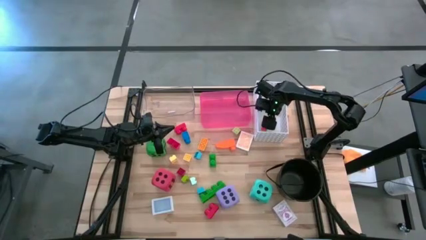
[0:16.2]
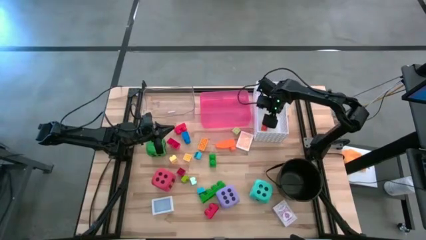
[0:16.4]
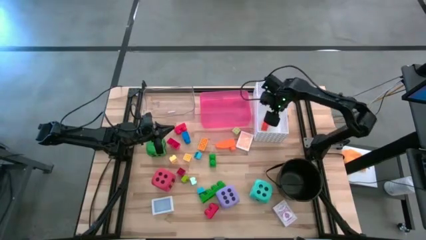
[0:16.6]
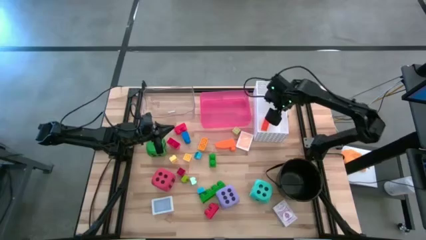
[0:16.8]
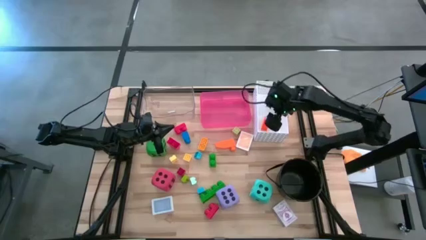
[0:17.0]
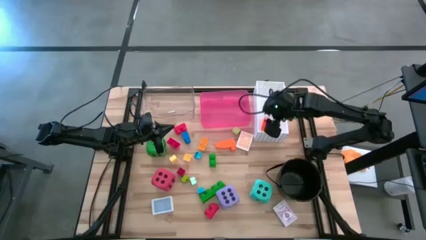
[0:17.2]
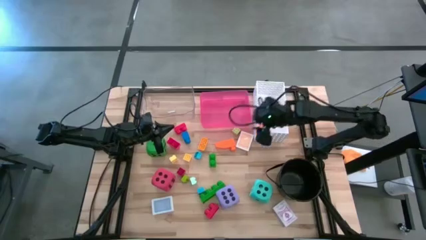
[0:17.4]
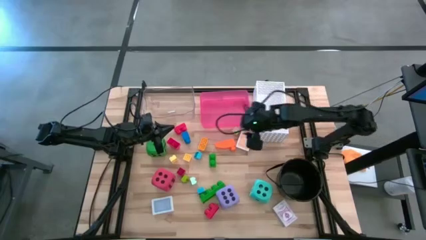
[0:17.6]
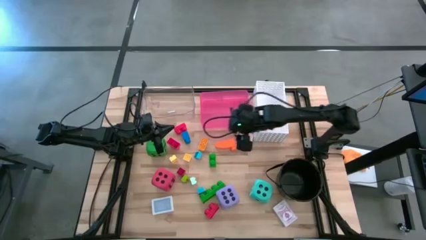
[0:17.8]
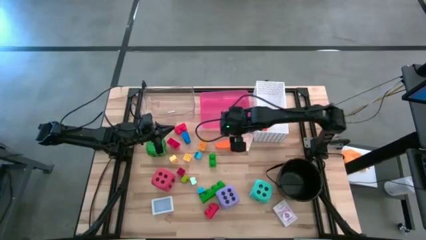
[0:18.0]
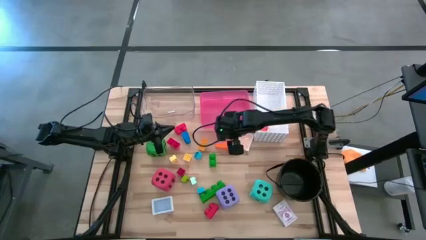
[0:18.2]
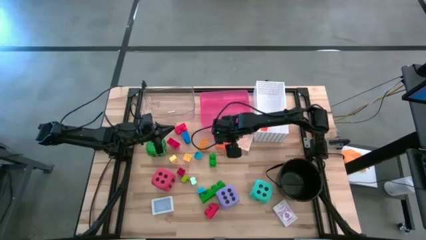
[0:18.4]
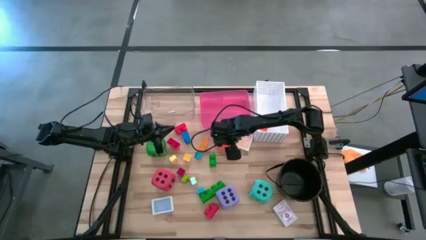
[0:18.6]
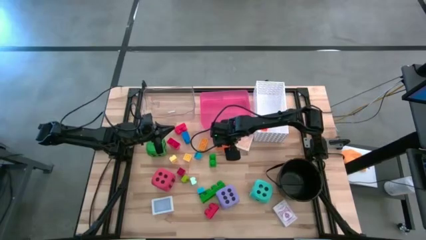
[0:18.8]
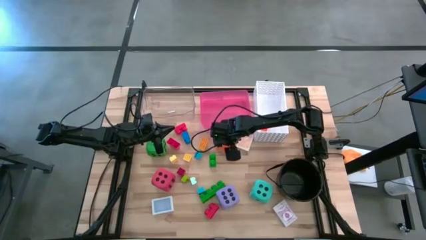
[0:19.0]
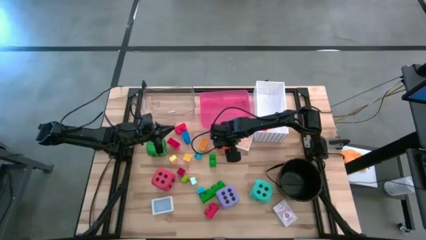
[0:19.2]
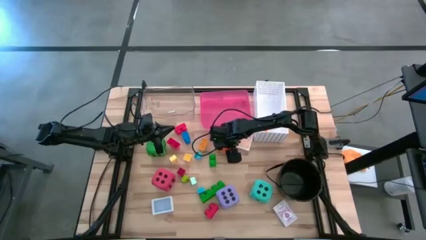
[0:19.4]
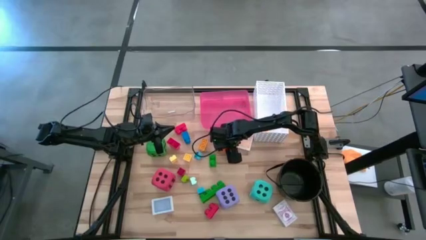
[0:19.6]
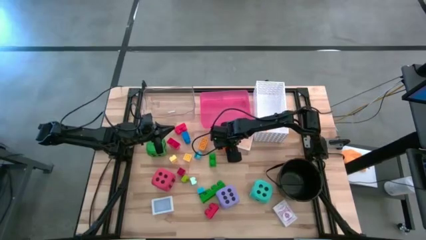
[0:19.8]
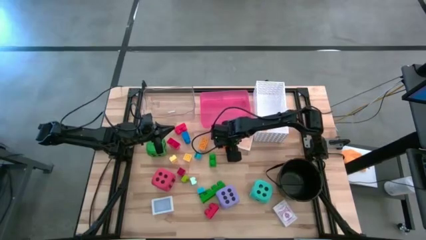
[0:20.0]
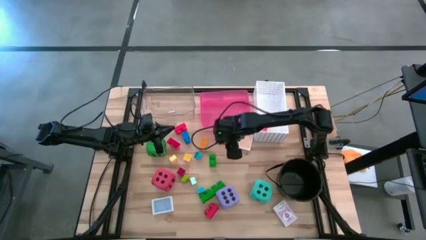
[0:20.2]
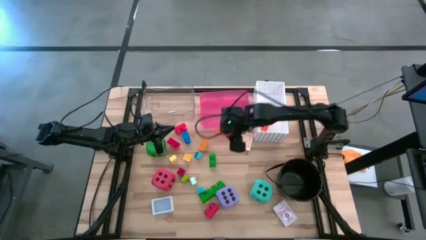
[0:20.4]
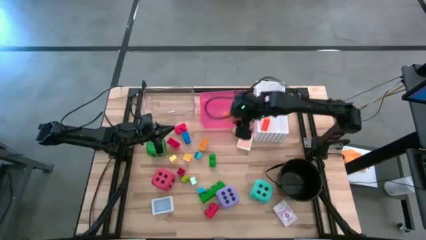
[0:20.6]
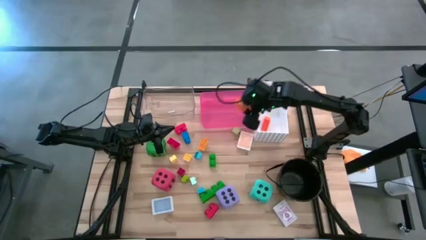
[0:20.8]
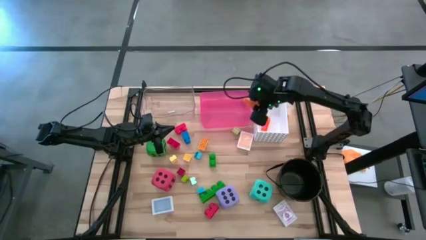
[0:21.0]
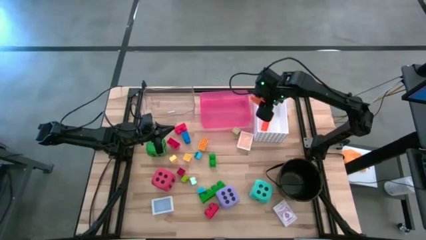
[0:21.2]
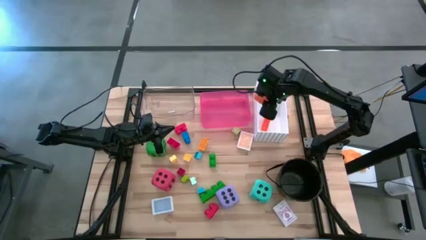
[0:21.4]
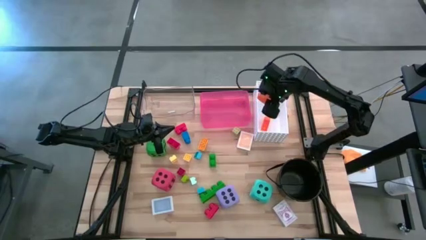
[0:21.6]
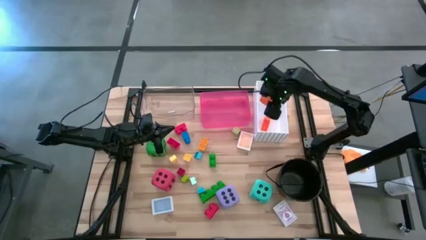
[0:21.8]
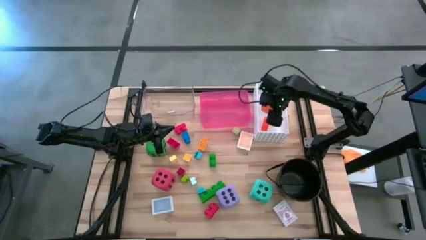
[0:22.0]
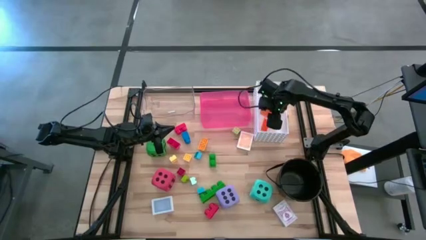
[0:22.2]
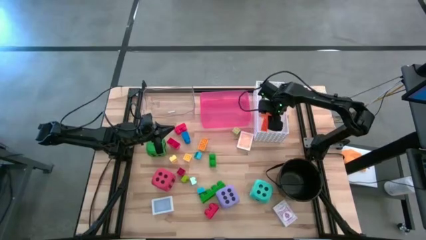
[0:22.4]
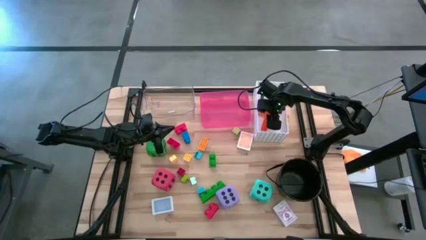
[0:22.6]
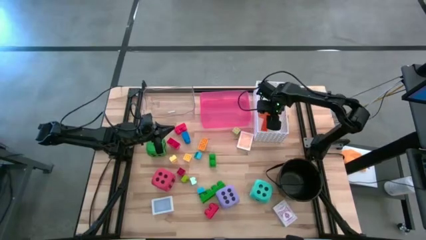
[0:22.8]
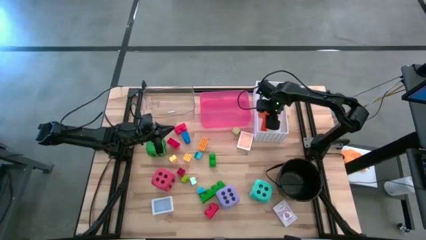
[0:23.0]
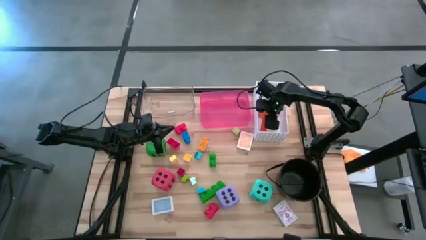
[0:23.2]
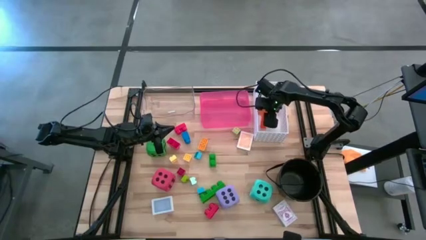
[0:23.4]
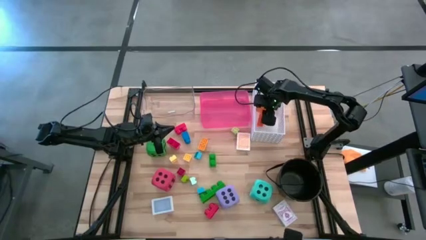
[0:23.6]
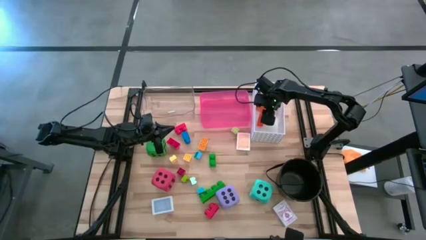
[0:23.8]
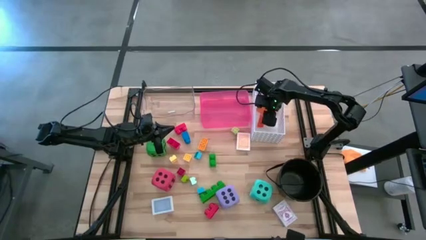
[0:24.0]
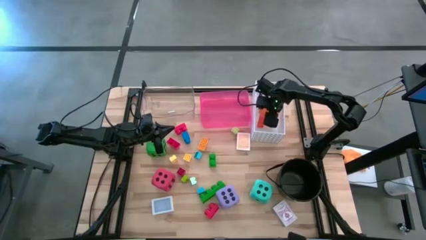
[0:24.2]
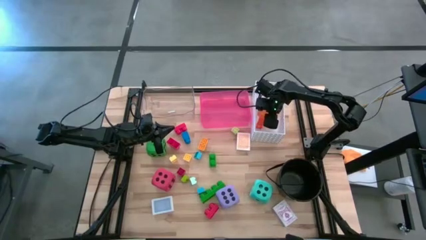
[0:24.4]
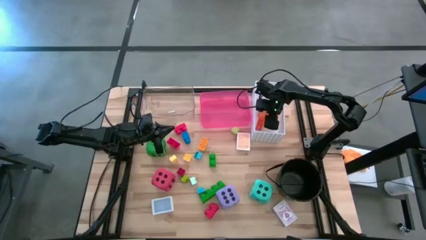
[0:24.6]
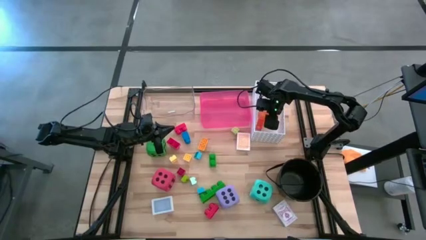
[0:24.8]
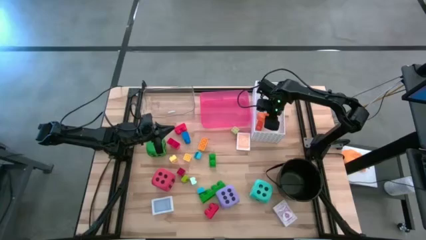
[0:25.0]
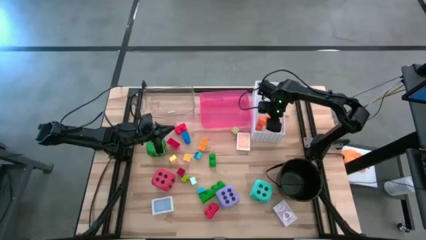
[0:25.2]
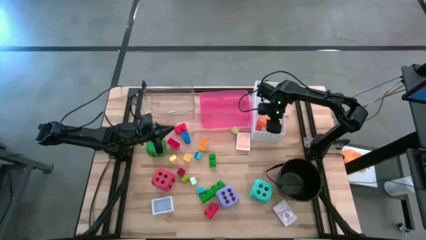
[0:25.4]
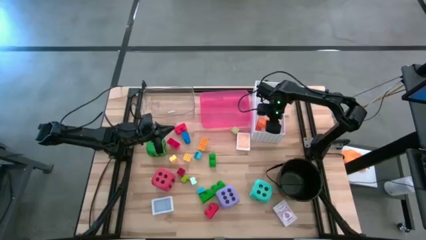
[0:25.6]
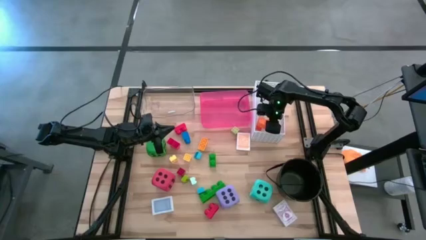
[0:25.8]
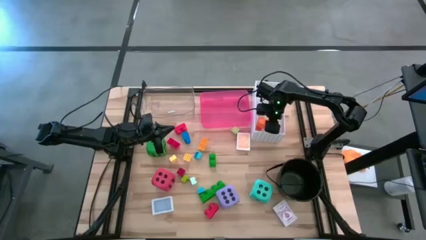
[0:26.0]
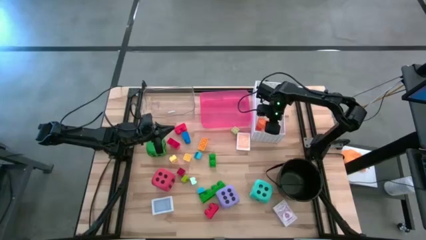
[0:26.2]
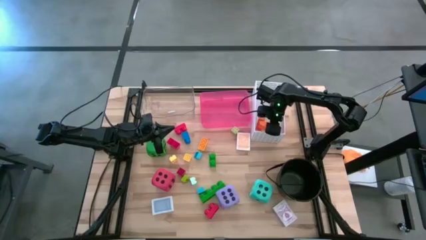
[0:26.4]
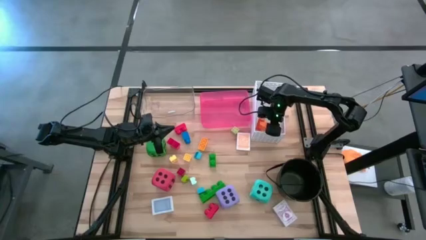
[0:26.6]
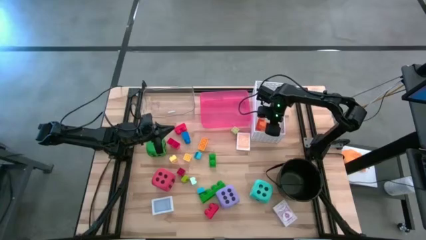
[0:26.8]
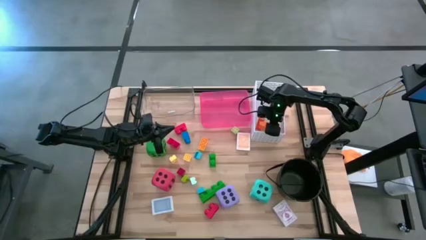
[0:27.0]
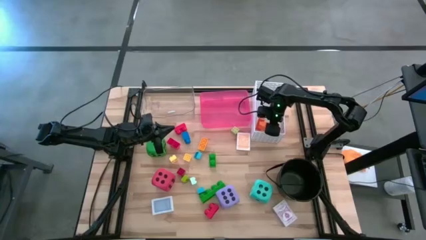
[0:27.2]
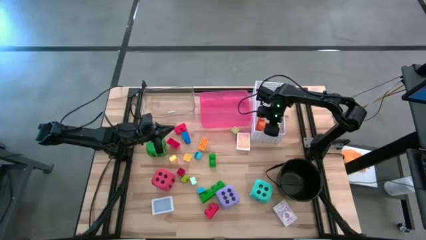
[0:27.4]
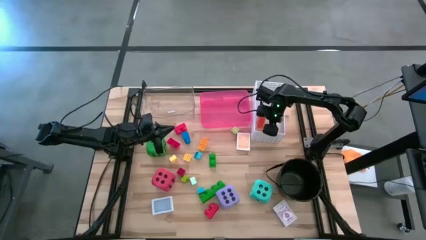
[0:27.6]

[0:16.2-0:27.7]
Task: Pick & Place Toys
Put the large orange game piece into the white bin

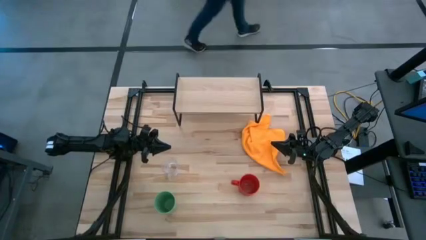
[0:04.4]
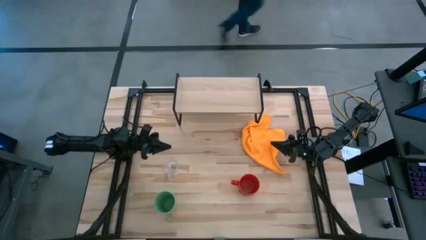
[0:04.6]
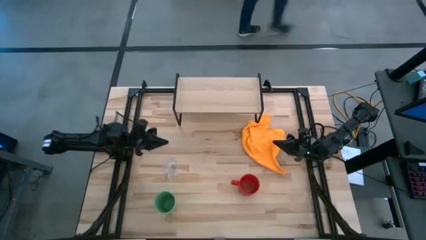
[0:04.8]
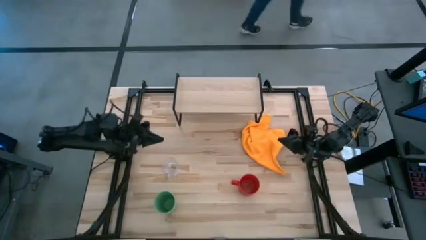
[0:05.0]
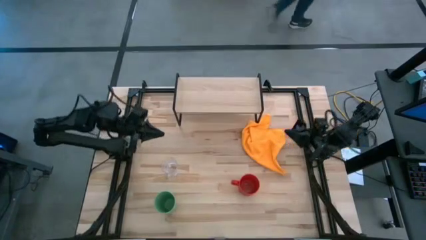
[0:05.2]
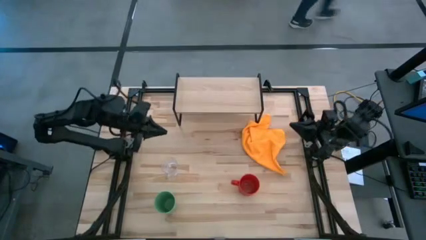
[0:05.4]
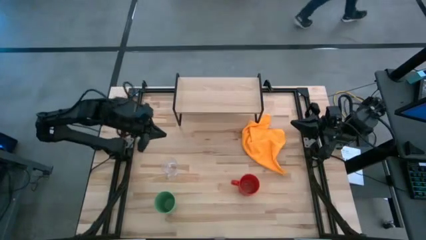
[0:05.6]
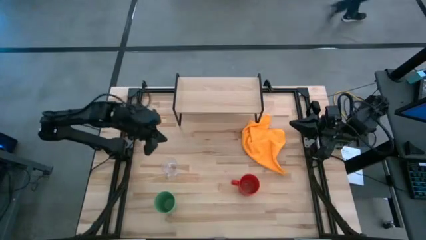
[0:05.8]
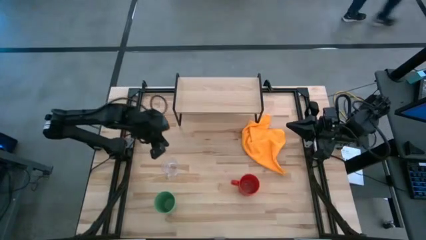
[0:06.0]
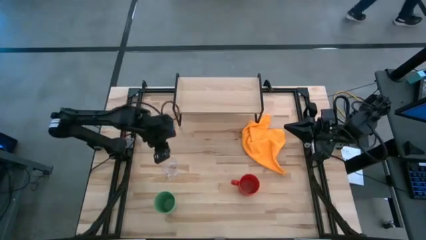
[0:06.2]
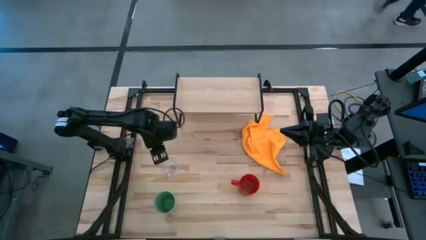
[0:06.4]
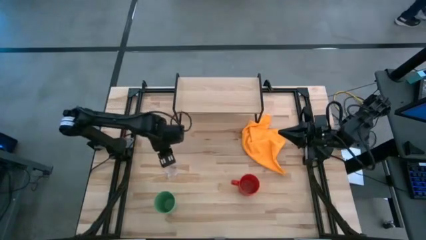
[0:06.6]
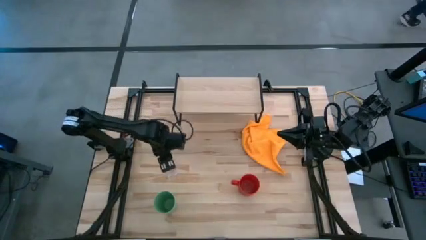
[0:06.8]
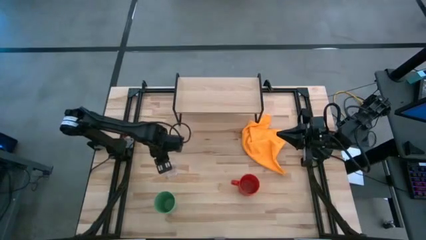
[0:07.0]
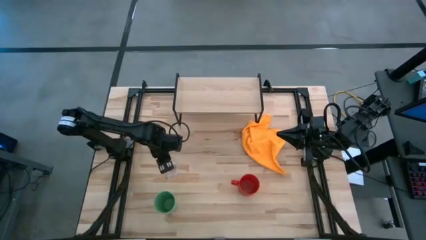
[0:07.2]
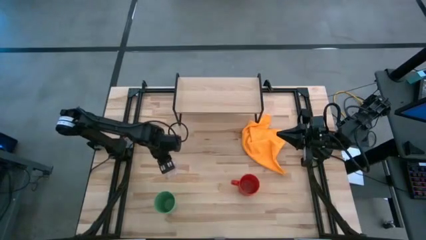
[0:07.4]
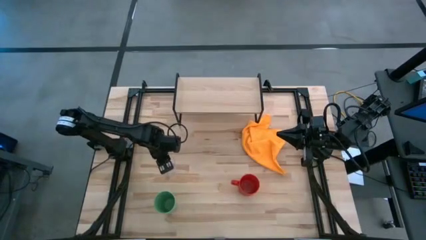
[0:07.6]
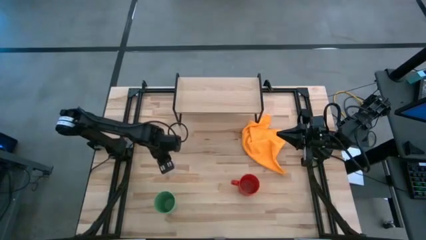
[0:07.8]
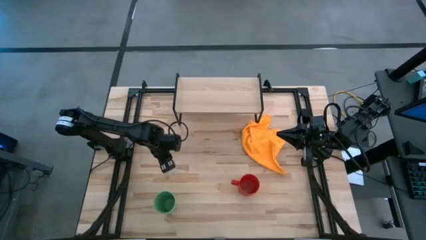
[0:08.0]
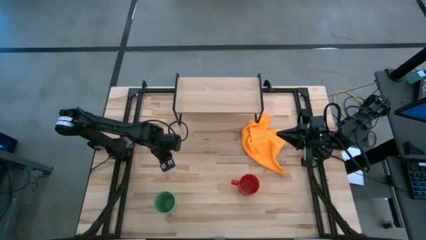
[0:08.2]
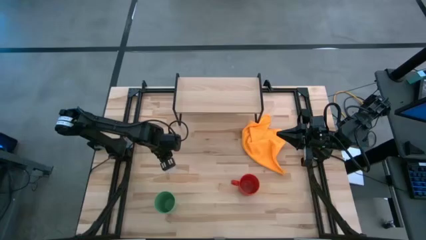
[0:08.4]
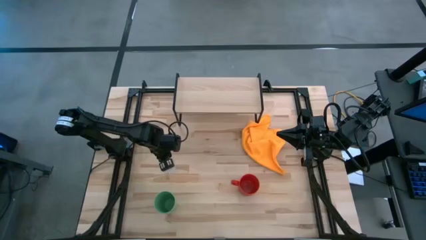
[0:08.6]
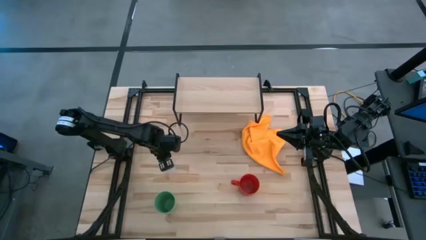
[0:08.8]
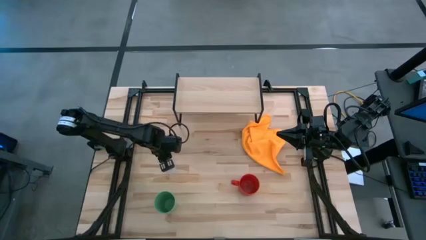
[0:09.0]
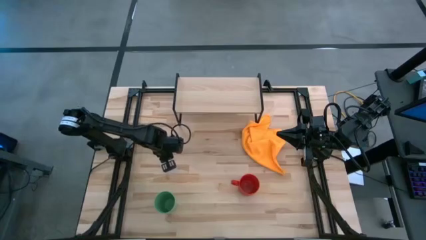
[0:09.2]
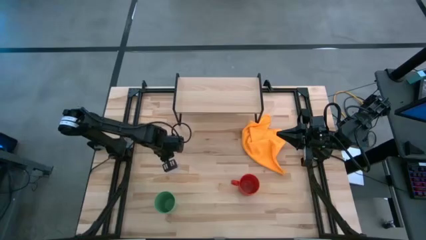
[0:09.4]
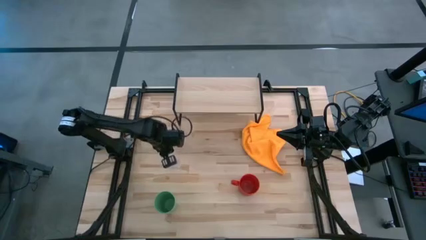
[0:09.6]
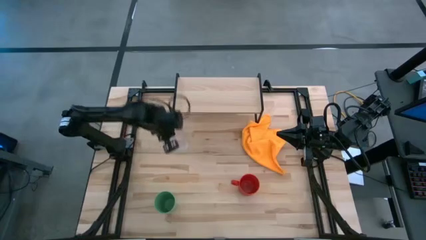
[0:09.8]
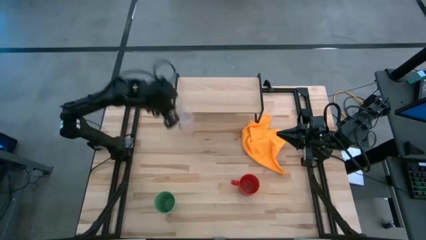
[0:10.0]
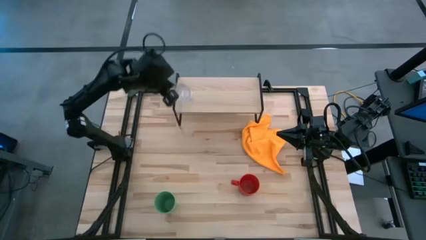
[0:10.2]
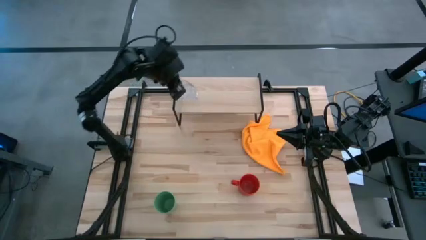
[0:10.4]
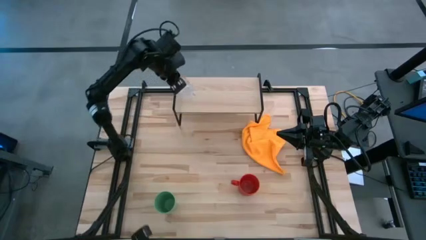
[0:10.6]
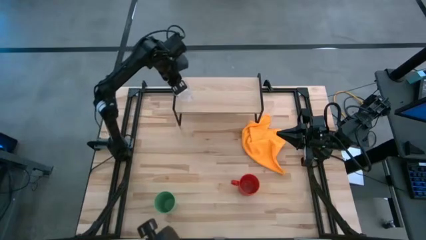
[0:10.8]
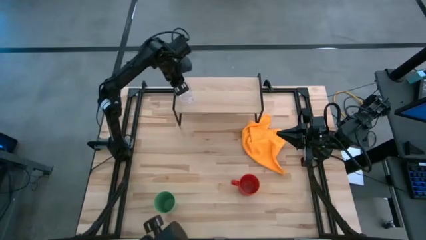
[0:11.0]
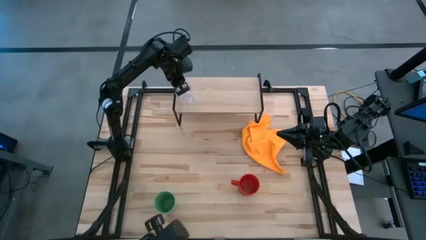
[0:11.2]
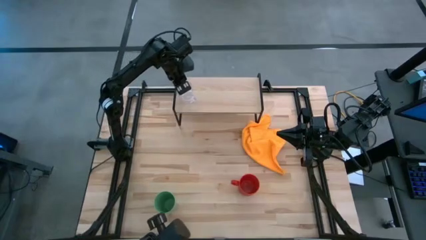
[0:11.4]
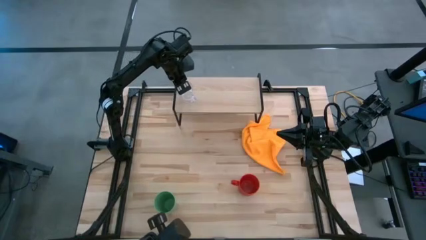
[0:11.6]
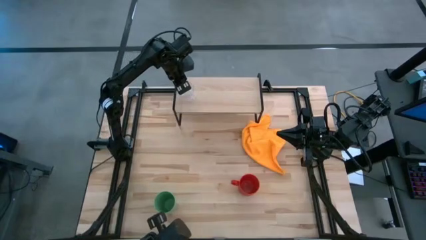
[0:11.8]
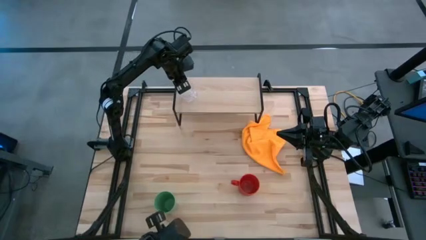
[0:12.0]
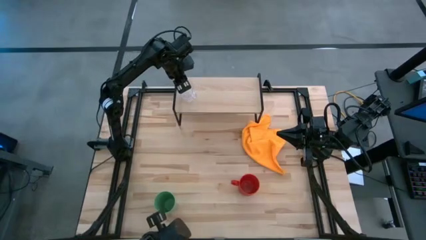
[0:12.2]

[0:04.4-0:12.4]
Task: Stack small to large cups/mugs on shelf
Put the transparent mug on the shelf
